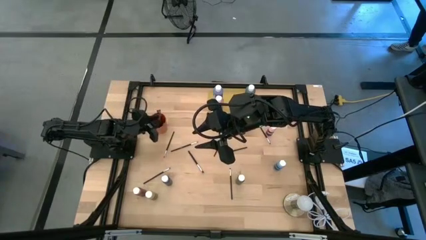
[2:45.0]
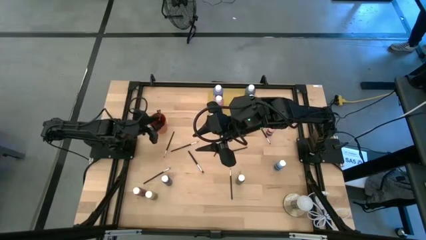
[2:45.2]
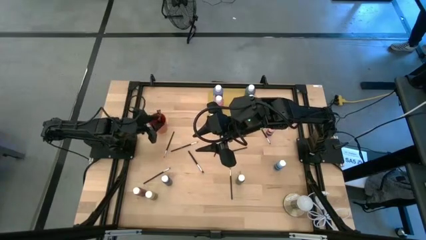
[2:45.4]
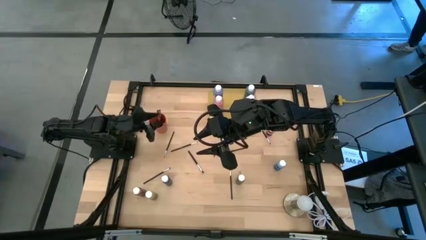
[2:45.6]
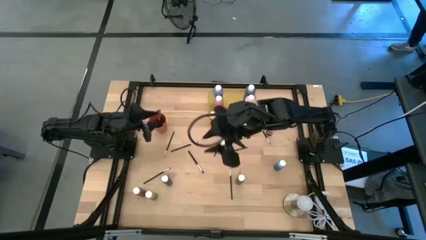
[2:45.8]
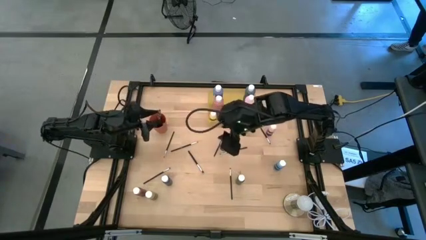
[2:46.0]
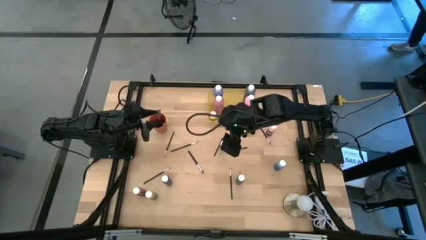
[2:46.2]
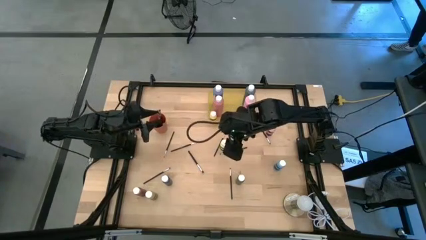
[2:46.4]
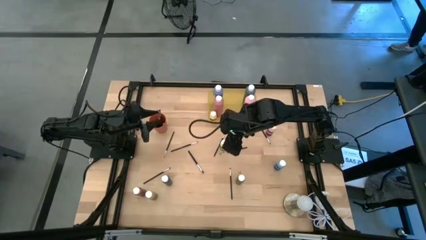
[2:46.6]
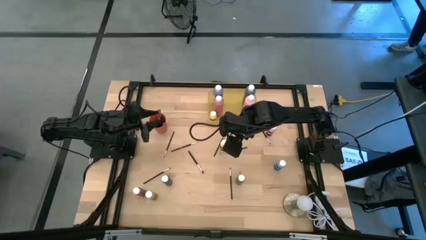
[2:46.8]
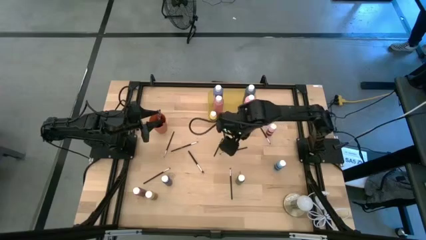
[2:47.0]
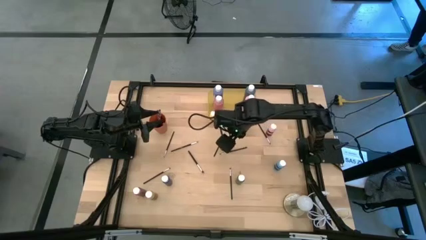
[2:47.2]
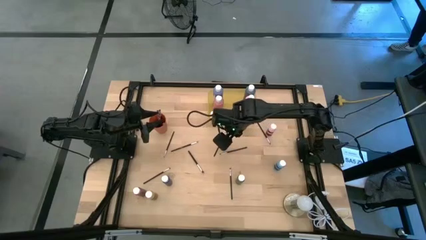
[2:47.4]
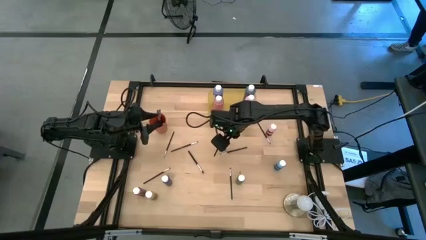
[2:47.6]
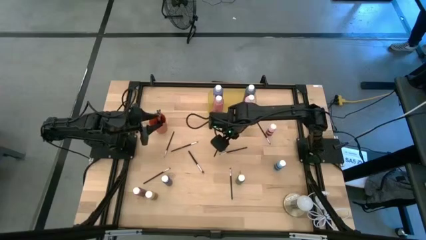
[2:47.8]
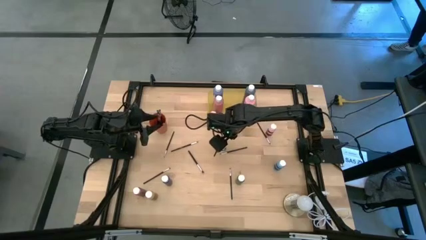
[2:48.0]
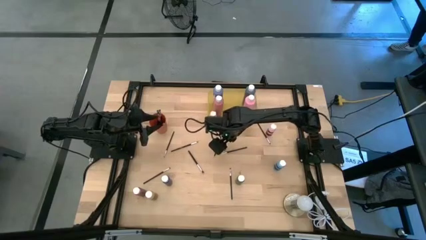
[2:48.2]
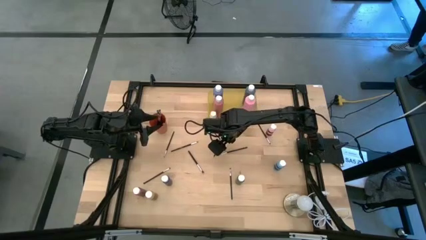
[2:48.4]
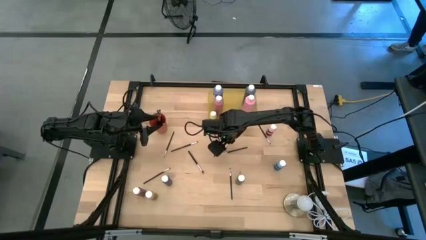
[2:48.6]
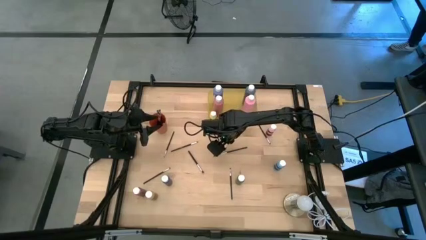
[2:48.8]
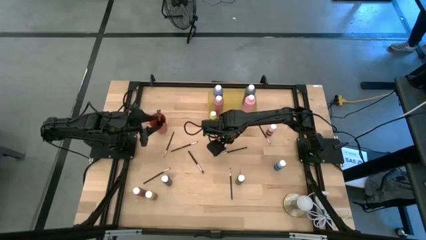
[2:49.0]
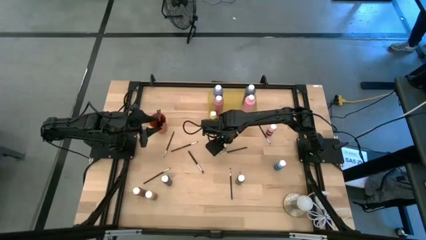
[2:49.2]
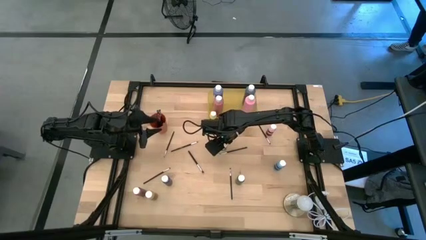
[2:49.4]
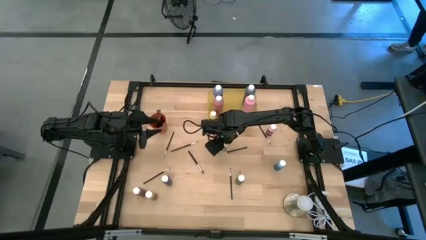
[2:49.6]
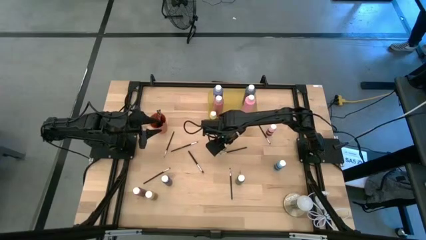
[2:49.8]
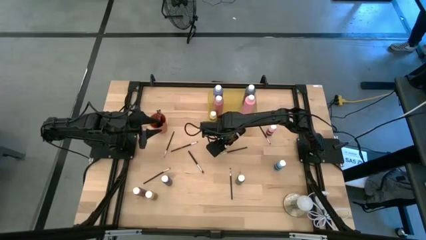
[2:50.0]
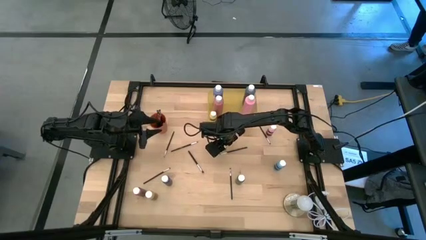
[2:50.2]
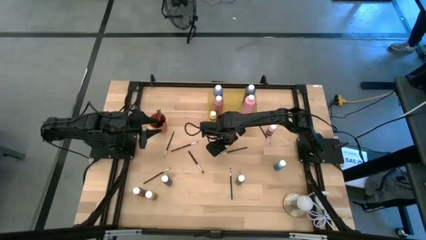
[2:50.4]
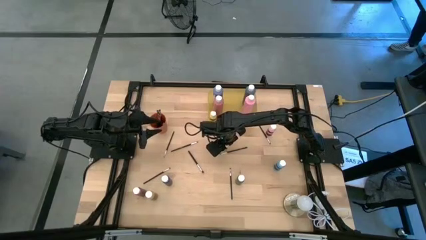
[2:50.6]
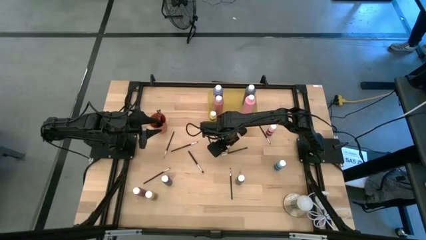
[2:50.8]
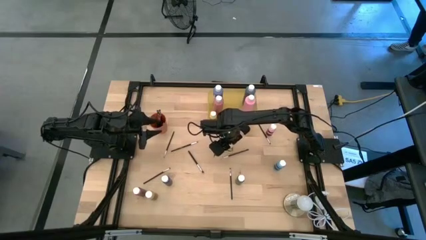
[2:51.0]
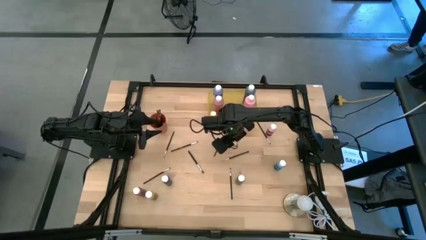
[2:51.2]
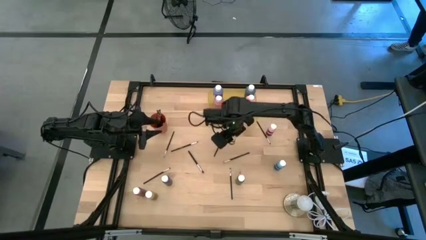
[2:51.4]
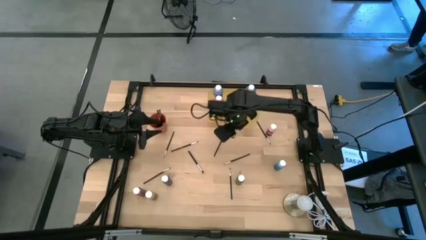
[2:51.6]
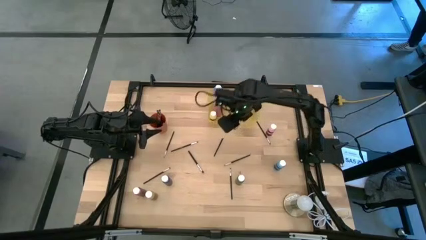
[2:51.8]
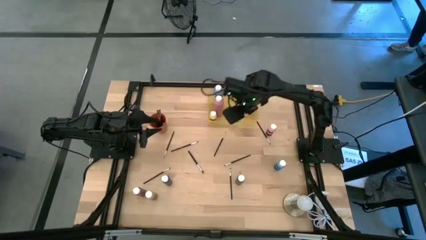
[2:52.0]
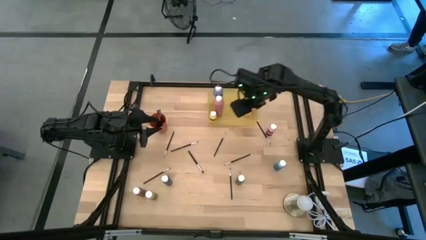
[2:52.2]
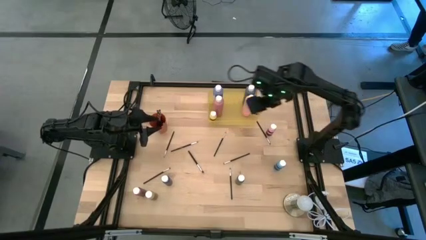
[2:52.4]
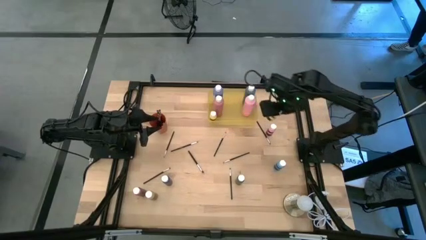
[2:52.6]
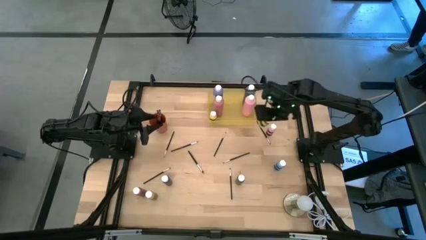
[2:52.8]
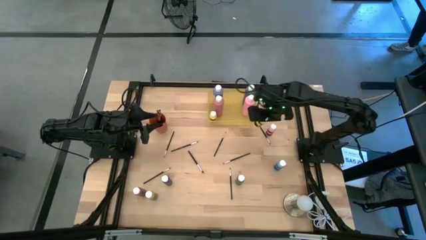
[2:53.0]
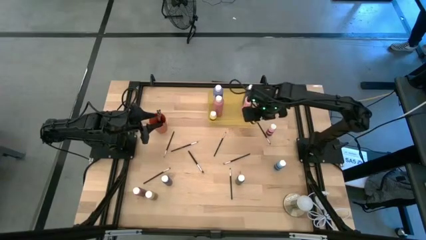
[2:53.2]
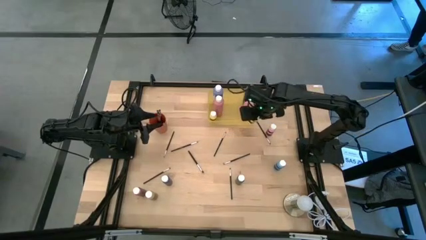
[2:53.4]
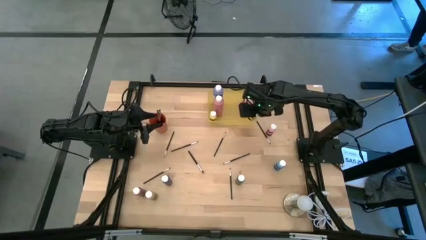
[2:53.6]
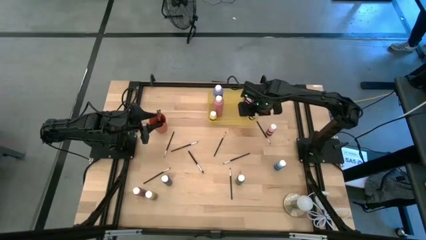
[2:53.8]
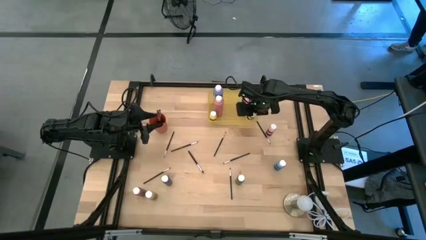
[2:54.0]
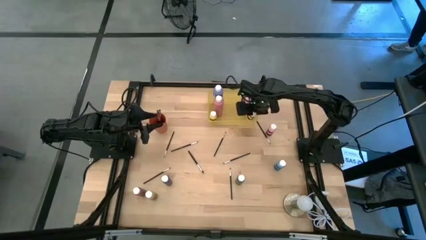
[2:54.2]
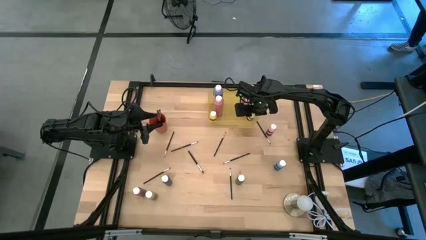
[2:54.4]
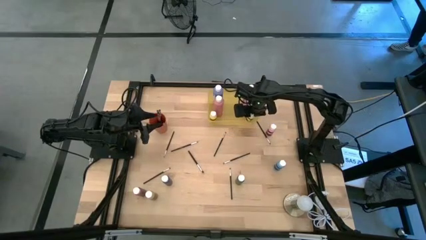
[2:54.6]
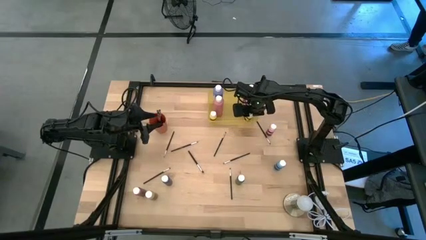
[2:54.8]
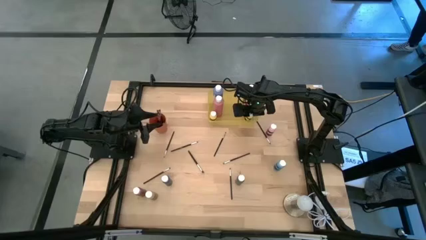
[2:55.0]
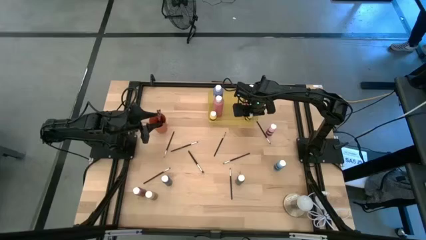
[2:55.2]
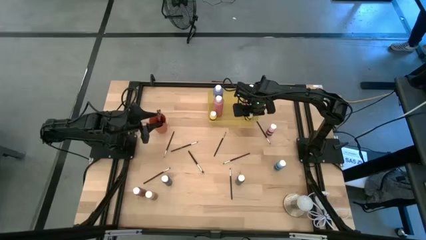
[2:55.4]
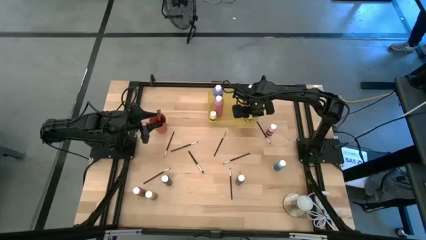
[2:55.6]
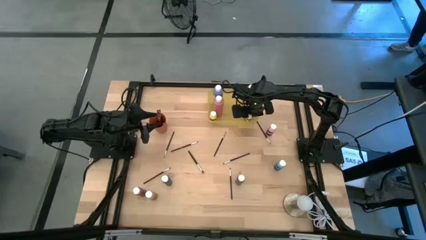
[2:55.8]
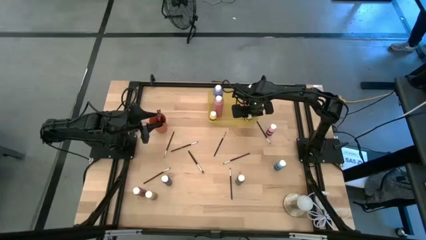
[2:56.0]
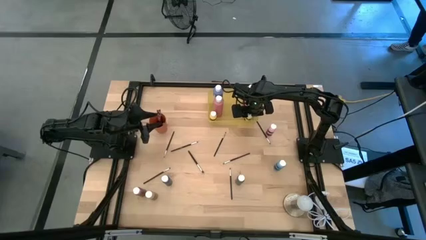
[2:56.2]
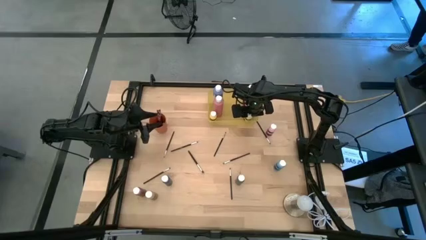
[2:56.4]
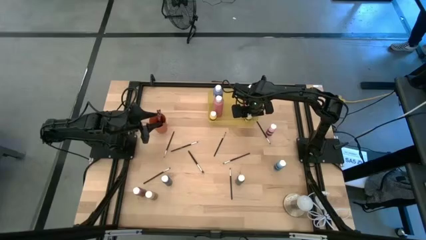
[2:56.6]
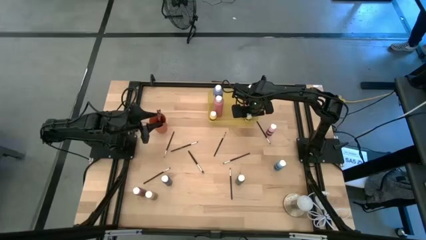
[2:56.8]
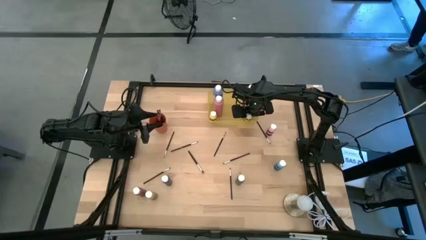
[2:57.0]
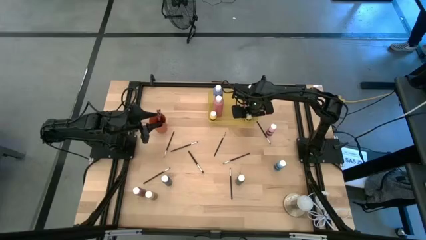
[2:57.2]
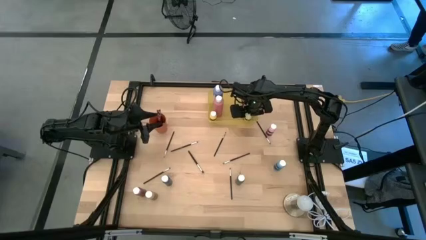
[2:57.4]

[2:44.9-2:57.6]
Task: Pick & Place Paint Supplies
Put the top small yellow paint bottle into the yellow bin

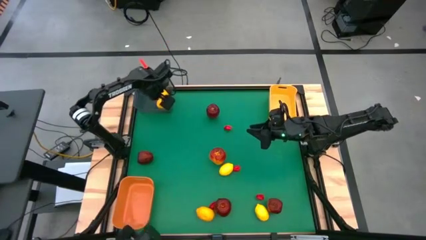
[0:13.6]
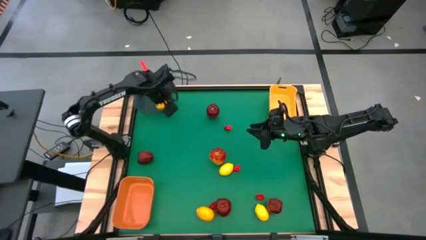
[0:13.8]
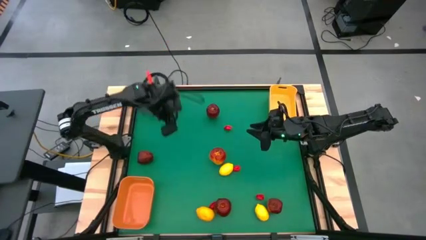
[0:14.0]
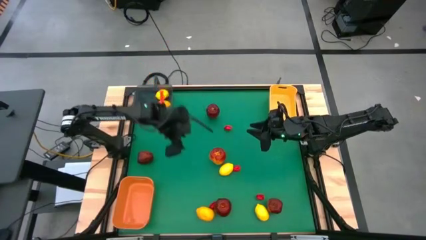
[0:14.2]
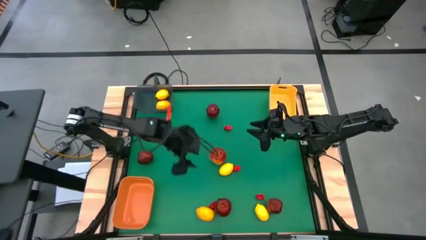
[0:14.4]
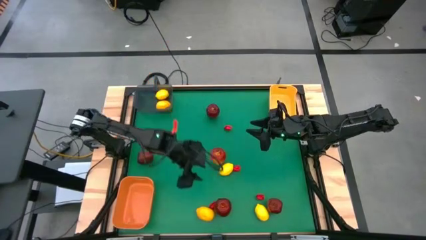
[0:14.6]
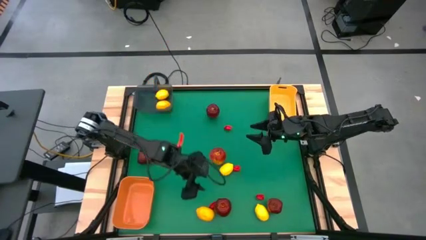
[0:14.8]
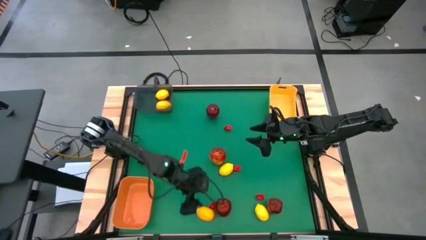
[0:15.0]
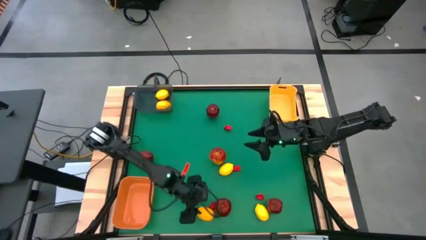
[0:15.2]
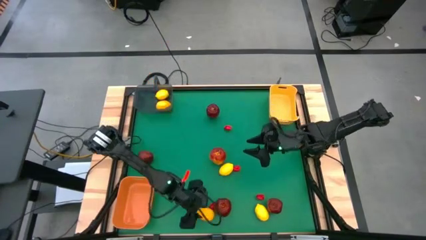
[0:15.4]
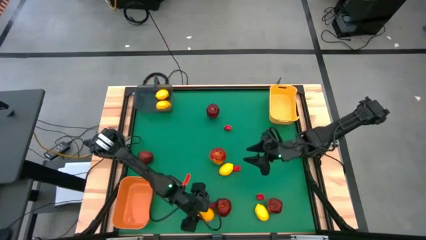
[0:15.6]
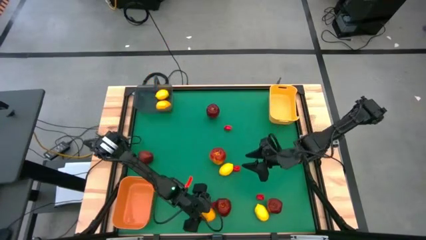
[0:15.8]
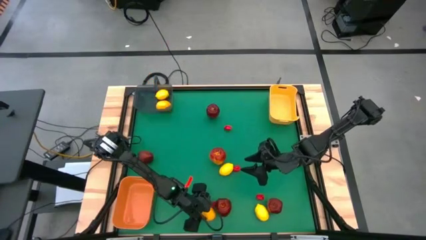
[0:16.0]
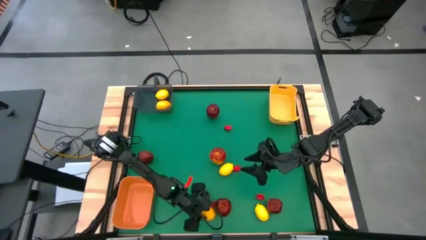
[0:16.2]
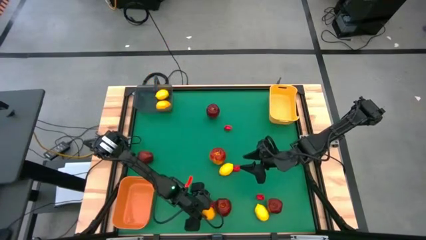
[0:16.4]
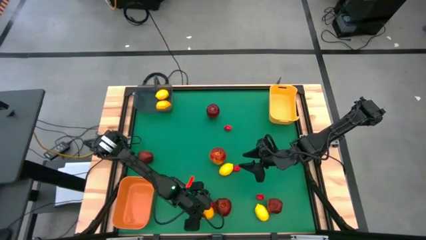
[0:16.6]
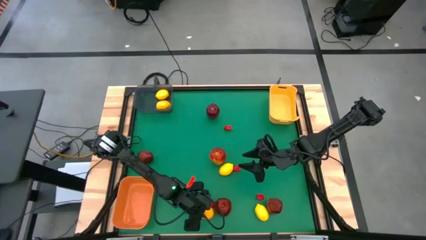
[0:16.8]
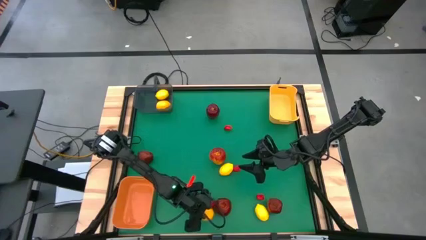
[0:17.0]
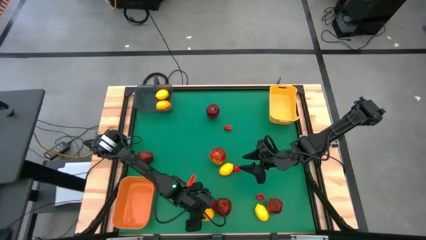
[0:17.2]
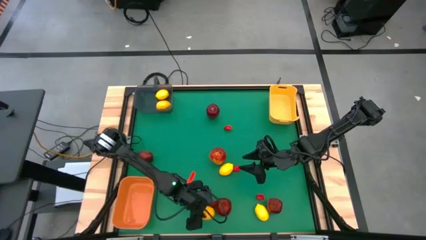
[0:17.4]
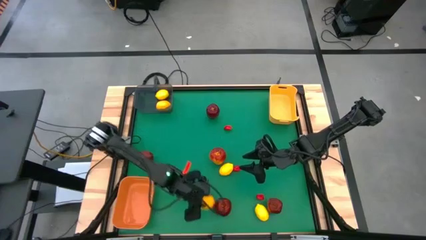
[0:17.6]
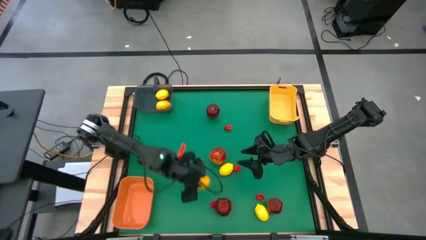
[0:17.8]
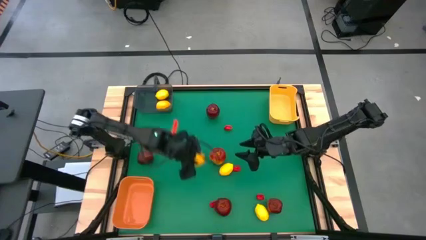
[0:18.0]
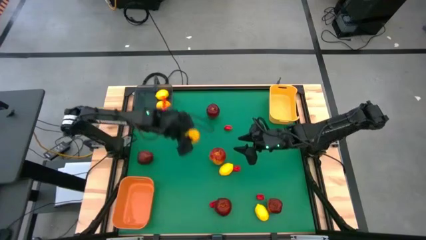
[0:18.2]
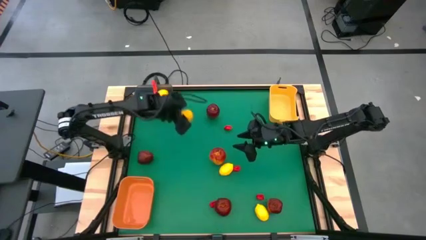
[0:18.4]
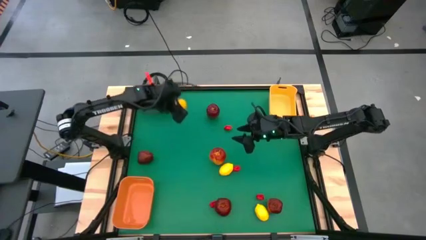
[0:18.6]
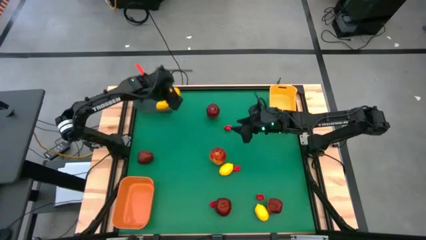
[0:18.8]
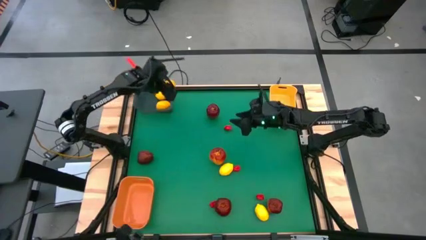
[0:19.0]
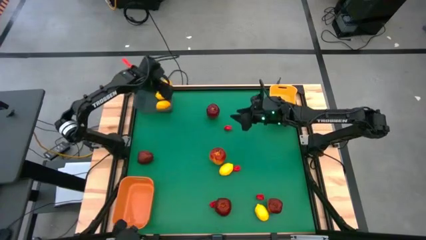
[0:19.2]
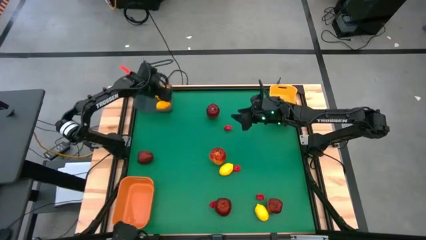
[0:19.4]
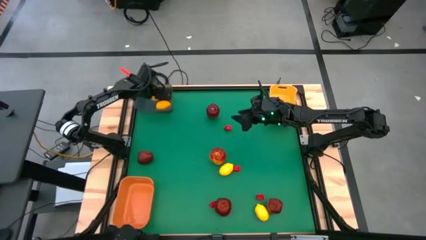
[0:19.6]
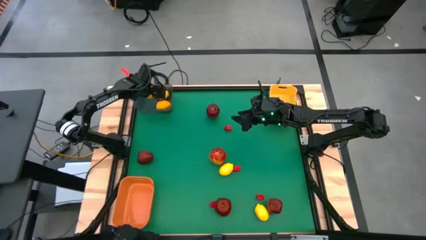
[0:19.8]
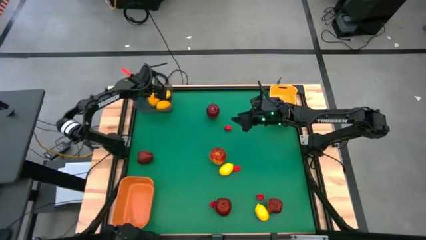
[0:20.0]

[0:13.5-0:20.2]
Task: Sort produce into baskets
Put the bottom-left lemon into the gray transparent bin
